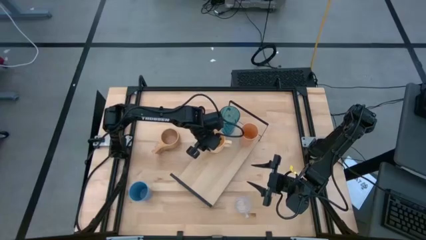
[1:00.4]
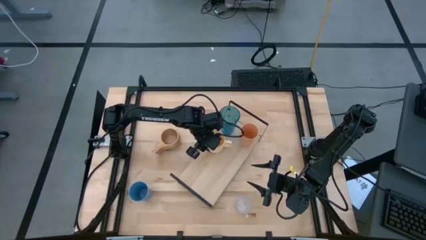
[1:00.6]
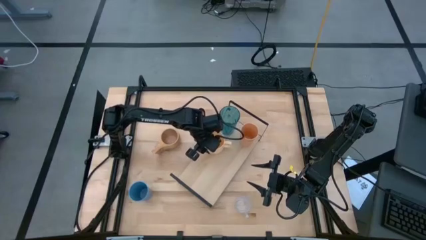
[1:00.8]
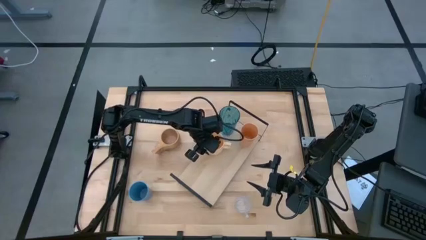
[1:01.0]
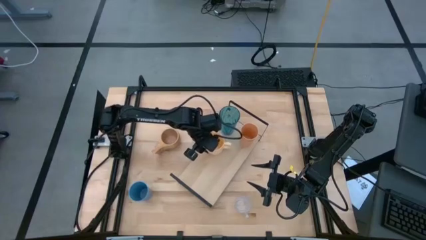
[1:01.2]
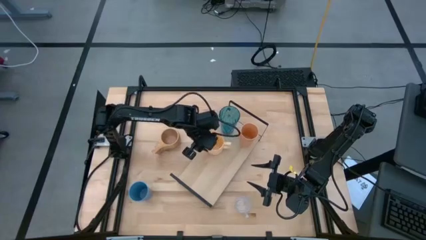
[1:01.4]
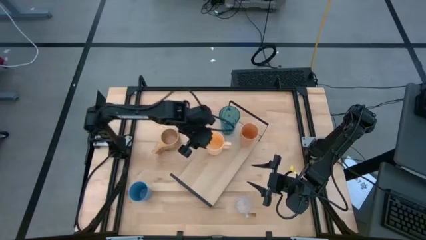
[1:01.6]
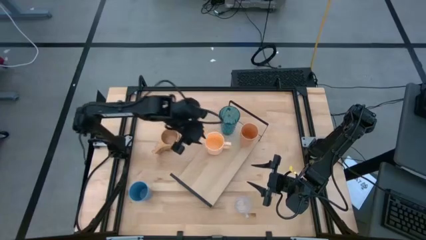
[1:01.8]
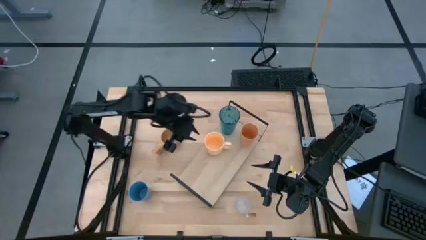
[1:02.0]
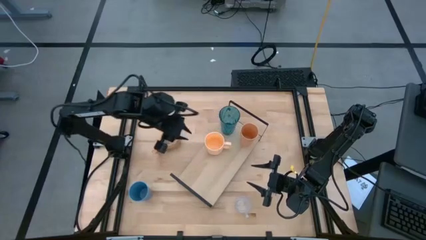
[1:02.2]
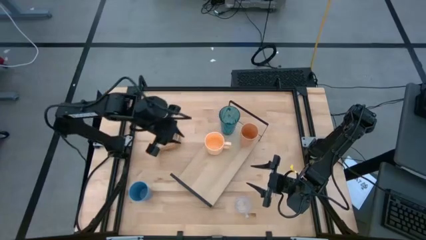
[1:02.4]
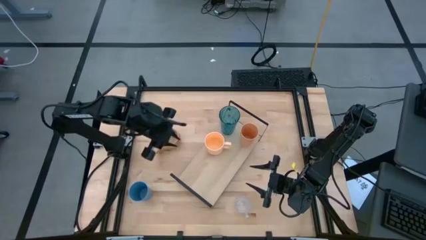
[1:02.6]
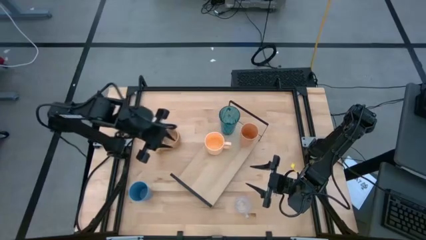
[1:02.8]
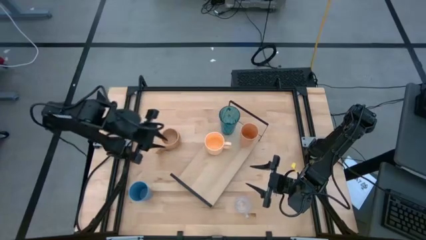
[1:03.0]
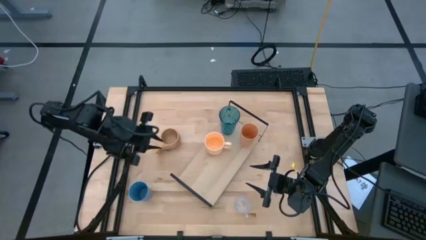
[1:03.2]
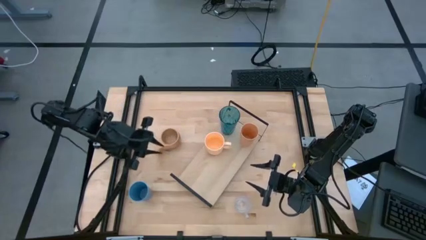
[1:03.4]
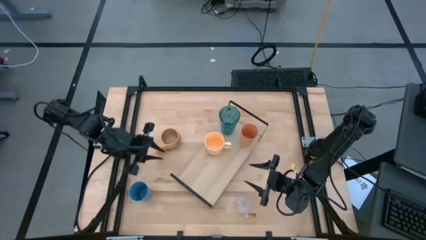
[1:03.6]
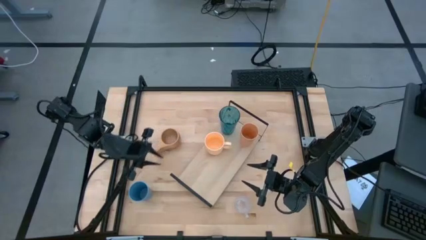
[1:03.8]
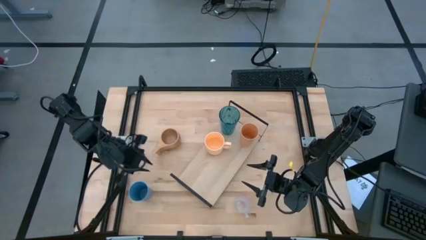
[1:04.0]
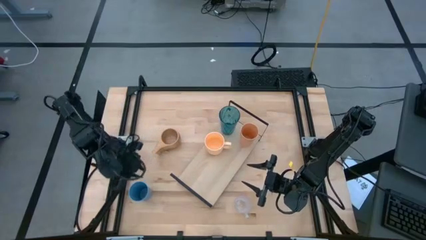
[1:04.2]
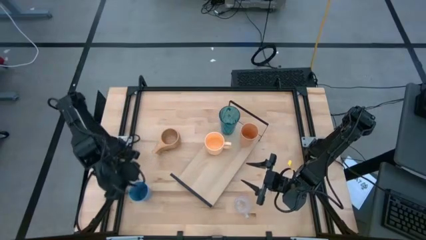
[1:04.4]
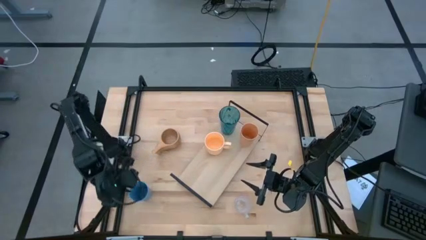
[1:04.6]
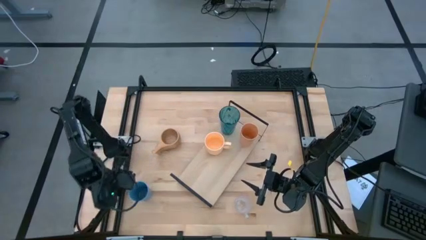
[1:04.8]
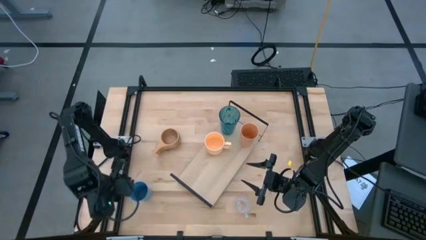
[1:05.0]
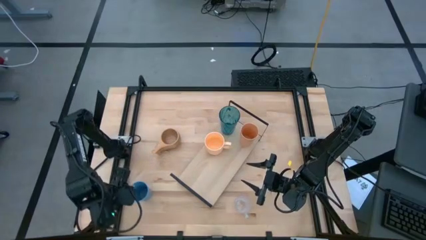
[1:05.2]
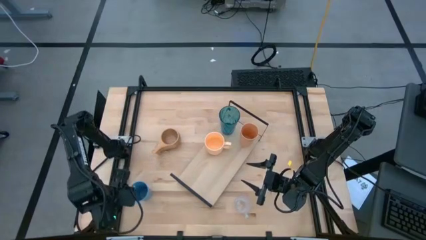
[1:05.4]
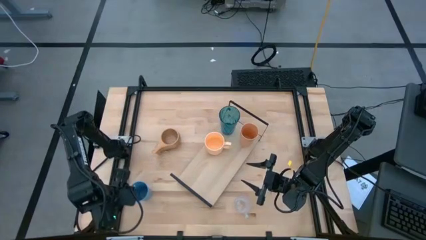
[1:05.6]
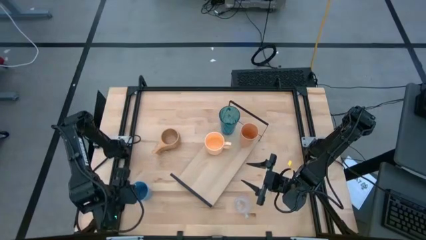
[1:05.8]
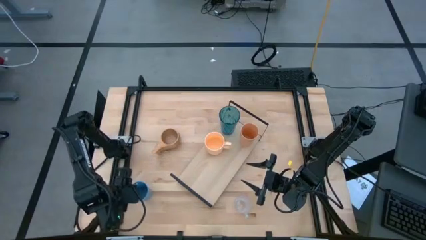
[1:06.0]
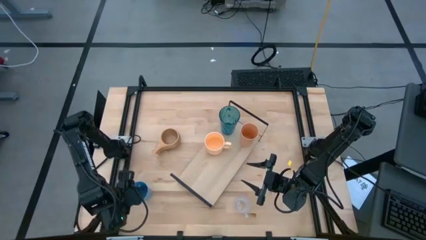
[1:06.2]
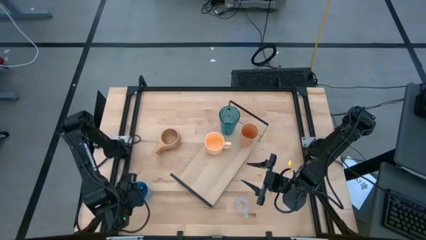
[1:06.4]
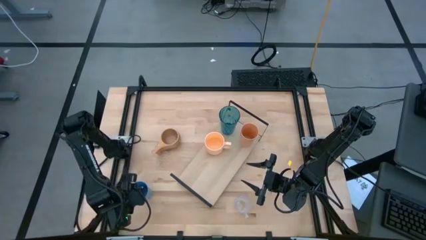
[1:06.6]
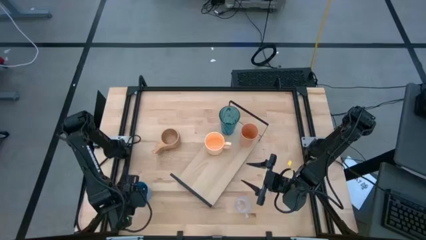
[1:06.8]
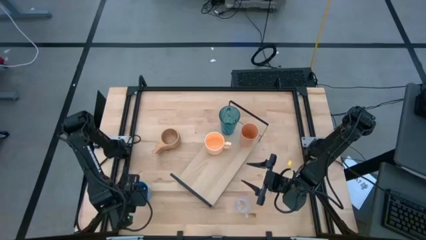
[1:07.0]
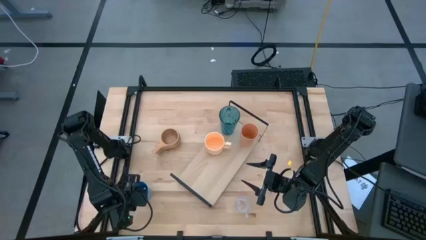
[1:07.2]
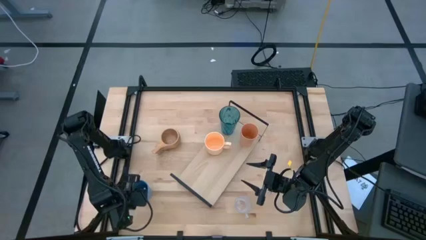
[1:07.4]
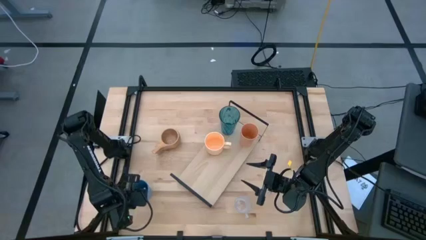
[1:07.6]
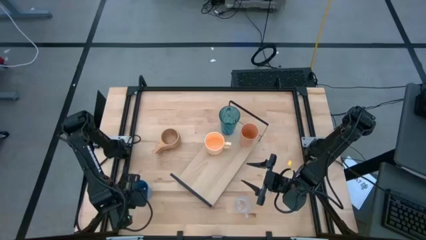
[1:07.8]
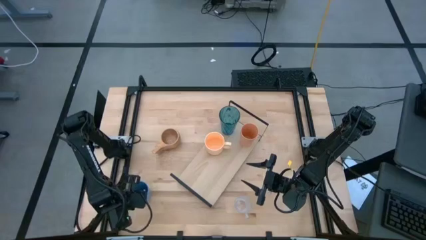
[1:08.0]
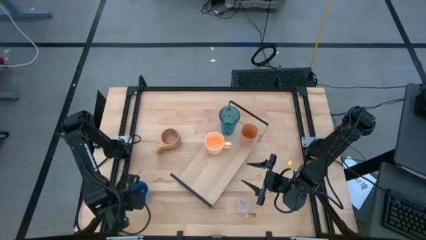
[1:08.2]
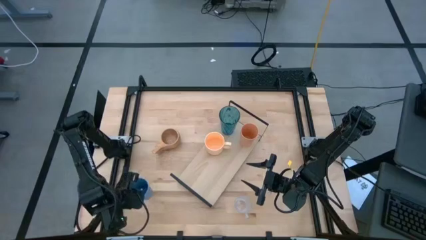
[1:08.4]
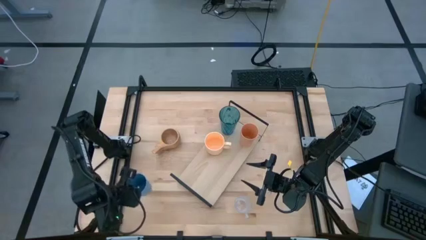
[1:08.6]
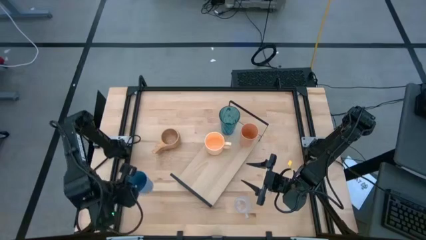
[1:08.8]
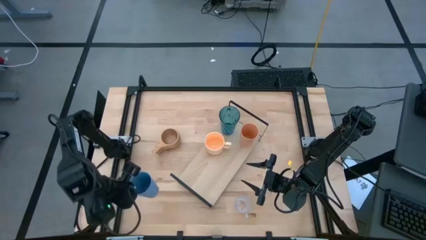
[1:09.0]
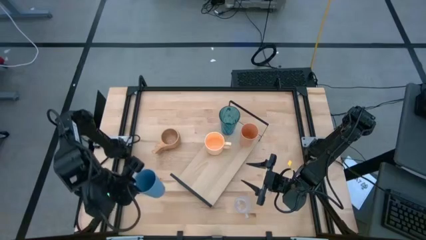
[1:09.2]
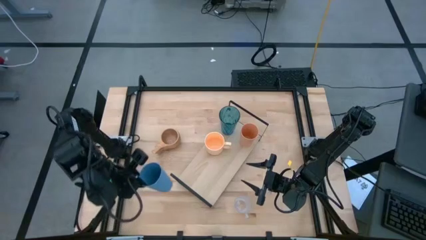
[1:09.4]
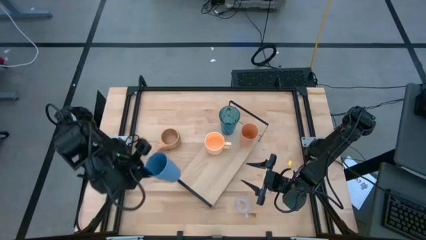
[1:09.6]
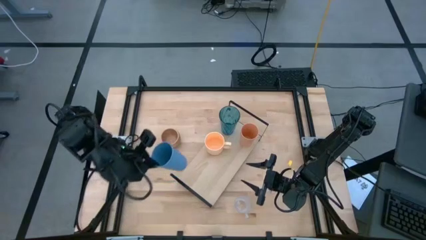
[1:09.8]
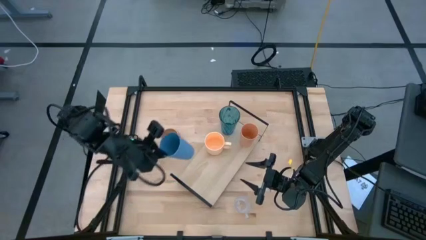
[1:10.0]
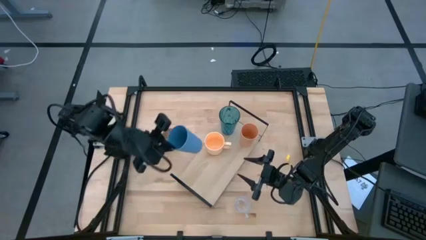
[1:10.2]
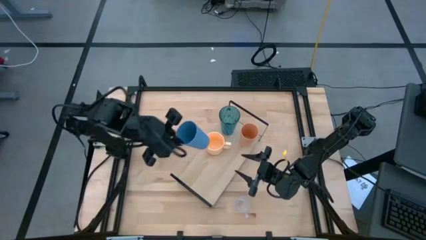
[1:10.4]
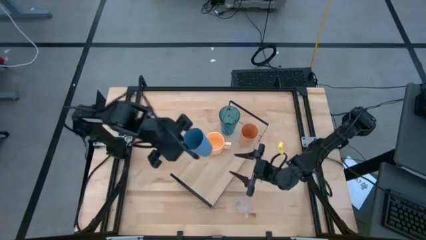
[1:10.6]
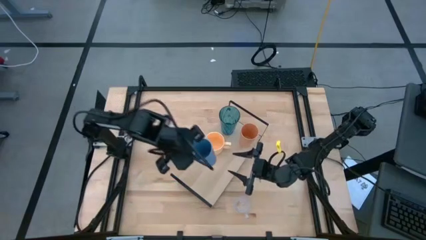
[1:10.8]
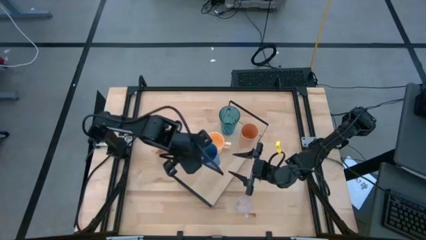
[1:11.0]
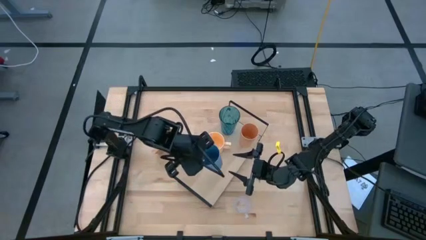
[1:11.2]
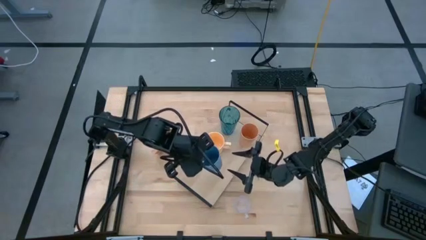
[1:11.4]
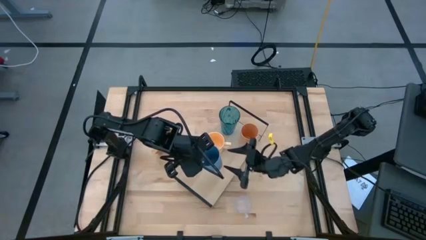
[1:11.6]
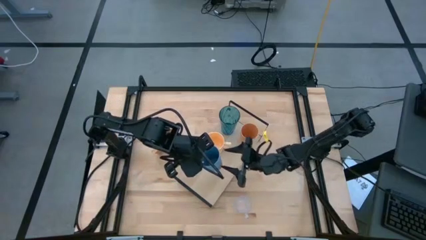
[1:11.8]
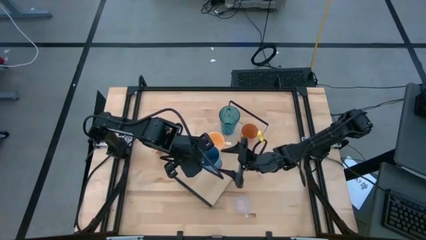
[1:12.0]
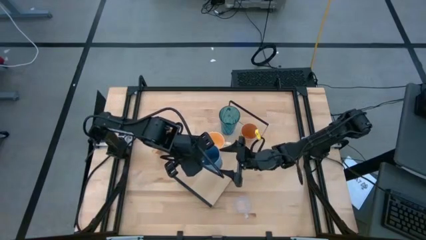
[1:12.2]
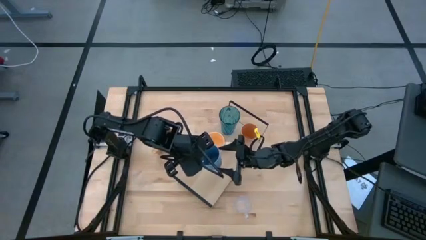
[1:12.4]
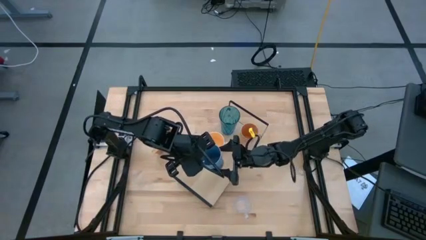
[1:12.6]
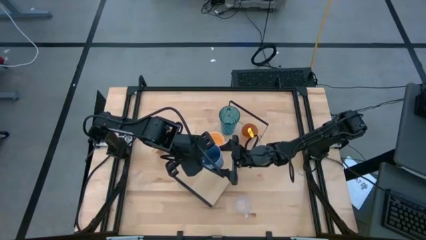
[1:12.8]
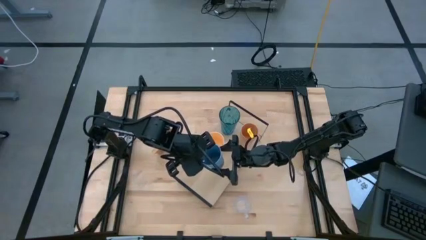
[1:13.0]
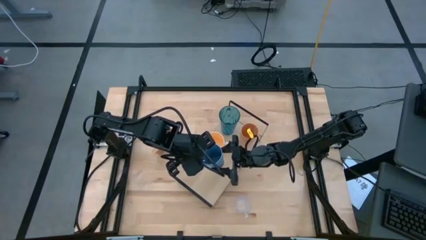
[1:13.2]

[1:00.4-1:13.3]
Task: Stack small to large cups/mugs on shelf
Put the blue cup on the shelf

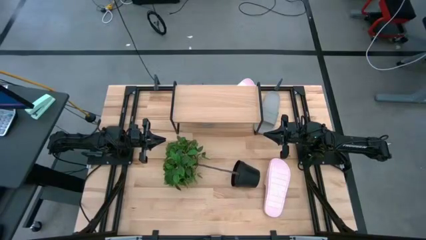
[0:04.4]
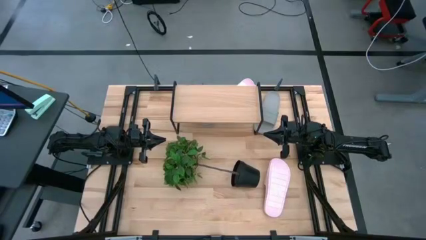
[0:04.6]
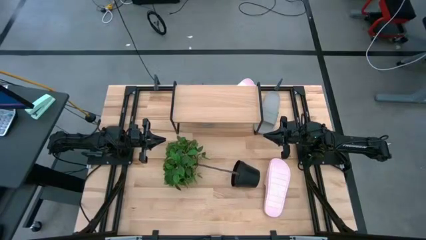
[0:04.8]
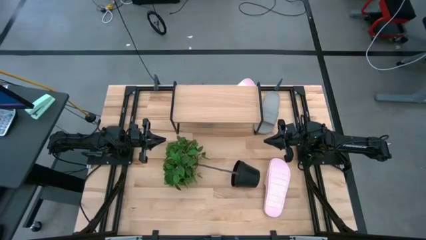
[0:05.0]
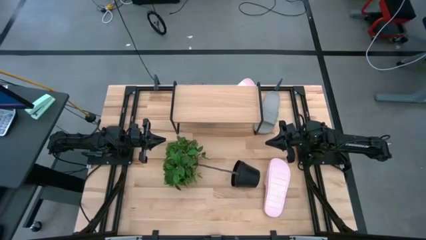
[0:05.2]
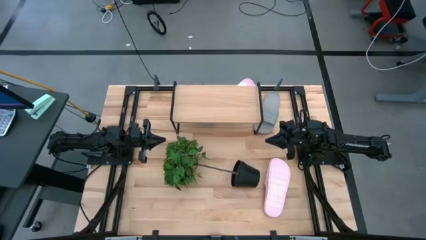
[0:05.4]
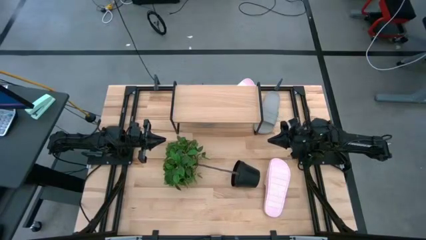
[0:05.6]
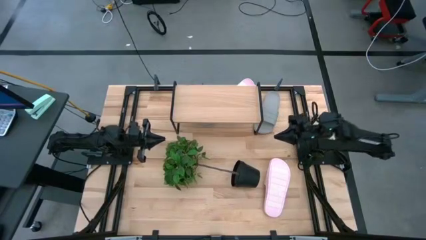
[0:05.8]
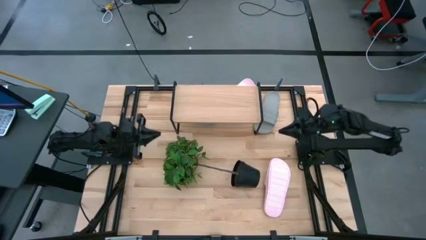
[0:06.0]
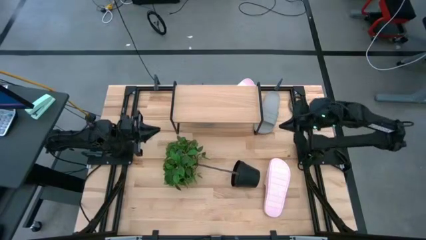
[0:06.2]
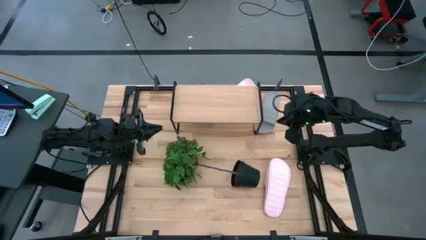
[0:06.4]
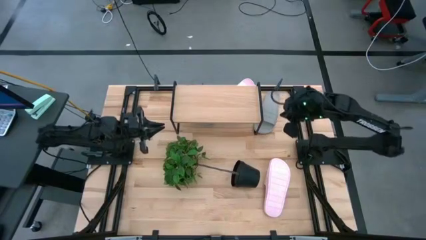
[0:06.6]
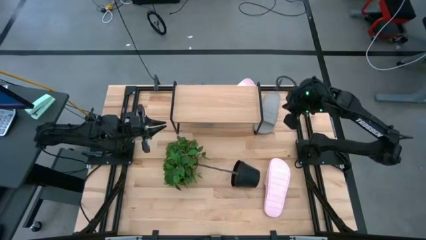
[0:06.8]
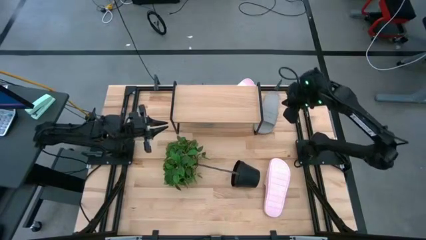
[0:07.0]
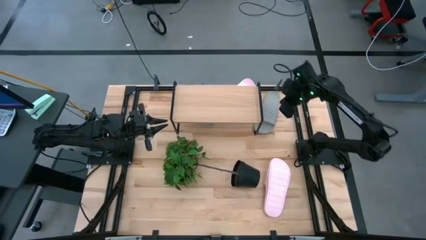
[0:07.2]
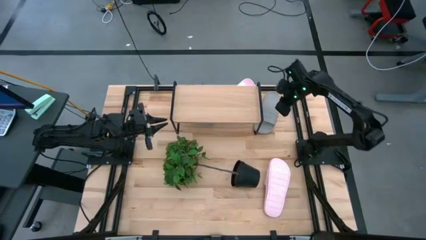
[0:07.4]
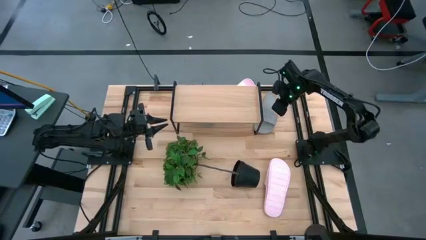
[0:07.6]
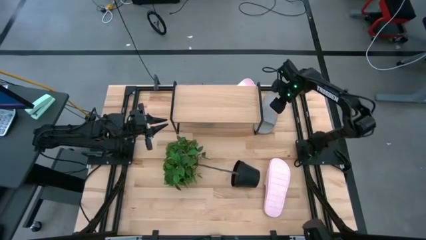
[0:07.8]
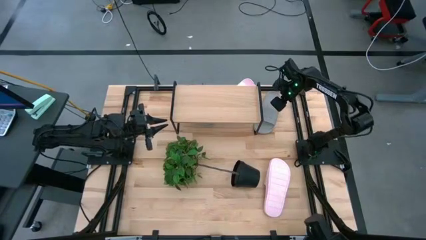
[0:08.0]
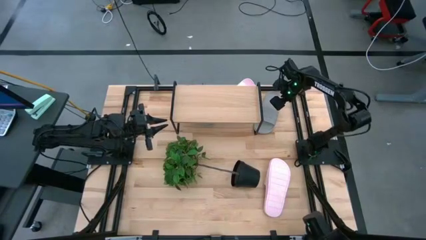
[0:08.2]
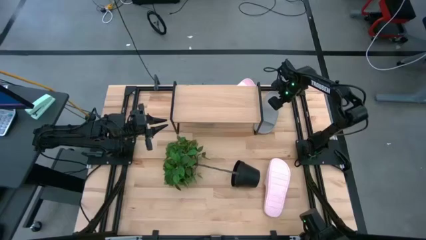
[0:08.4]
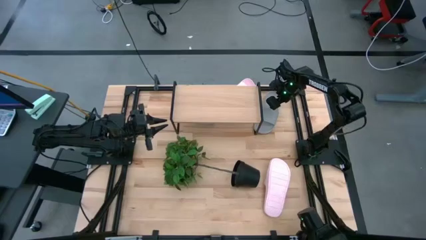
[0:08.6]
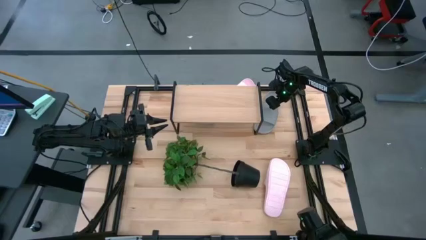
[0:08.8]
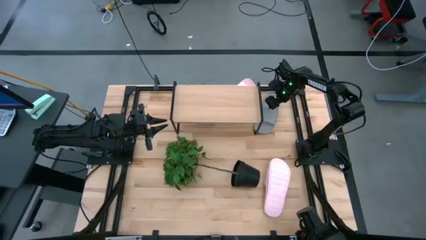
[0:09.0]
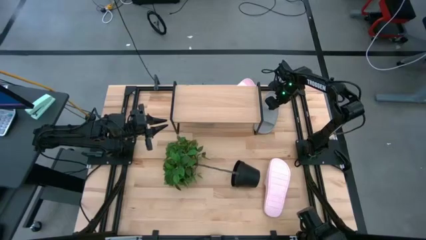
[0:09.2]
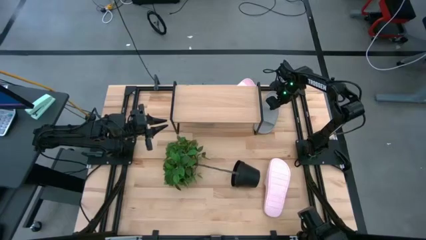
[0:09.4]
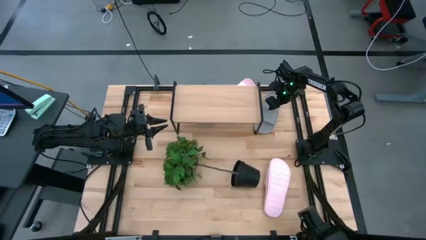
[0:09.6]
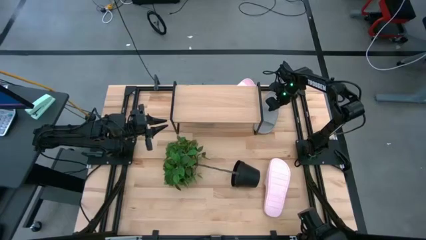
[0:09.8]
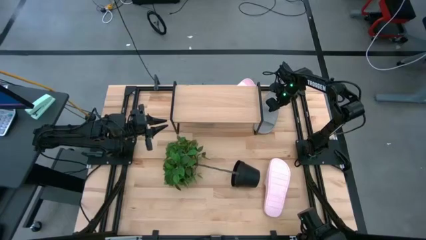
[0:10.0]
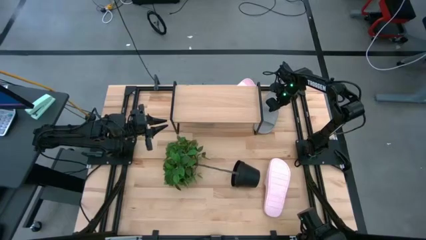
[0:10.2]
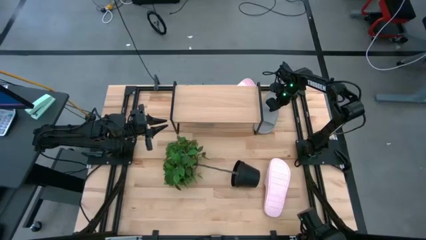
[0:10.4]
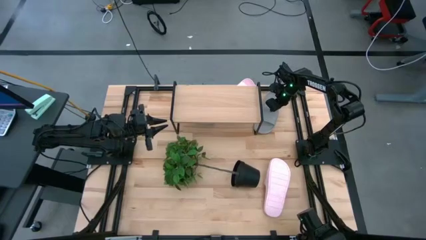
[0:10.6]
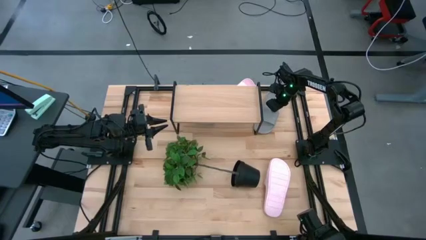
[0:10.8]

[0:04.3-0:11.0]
Task: Pick and place slides into the shelf
Put the right gray slide on the shelf
